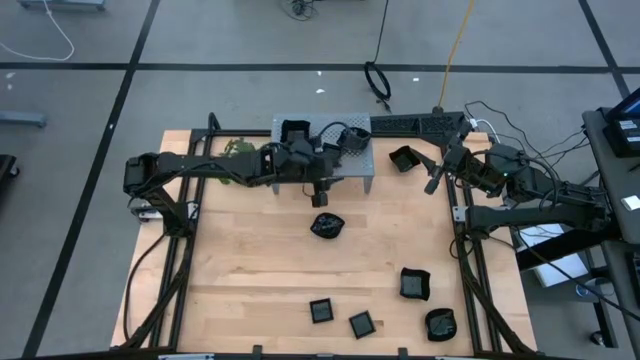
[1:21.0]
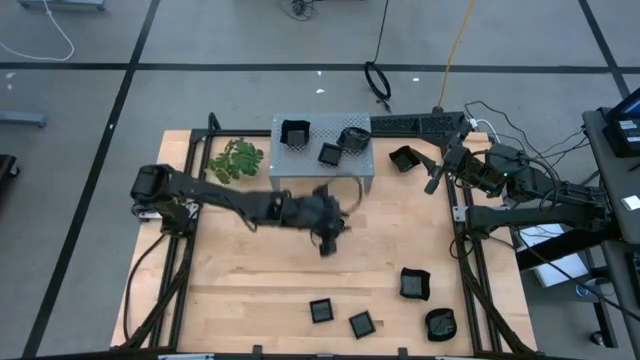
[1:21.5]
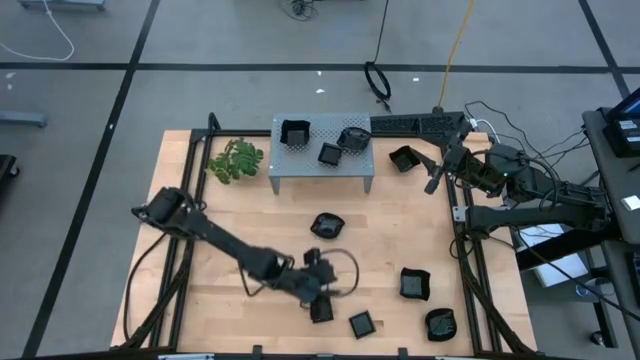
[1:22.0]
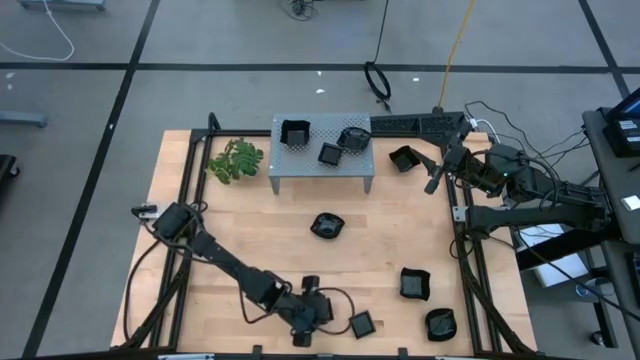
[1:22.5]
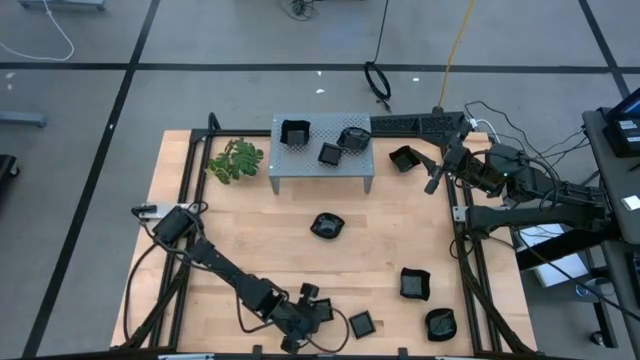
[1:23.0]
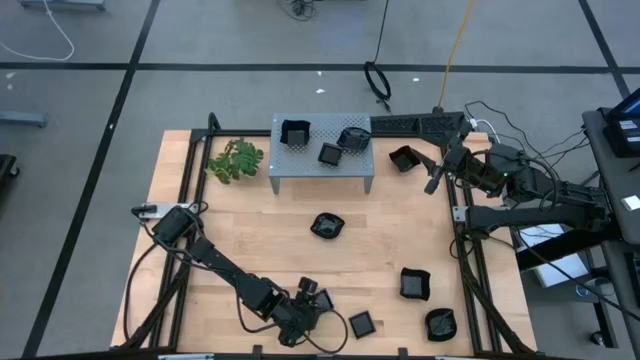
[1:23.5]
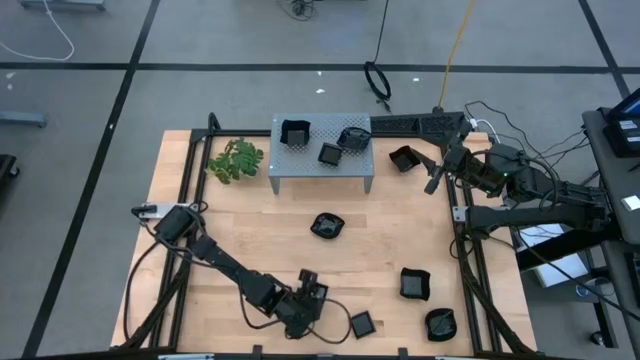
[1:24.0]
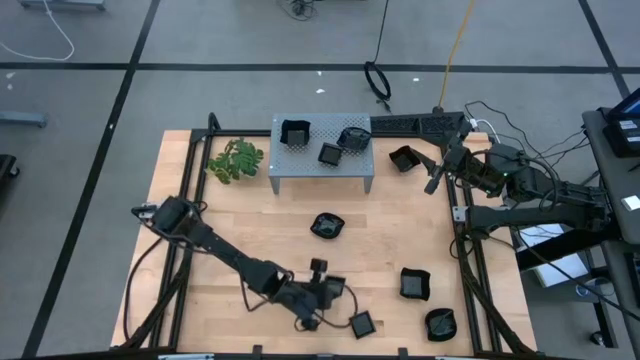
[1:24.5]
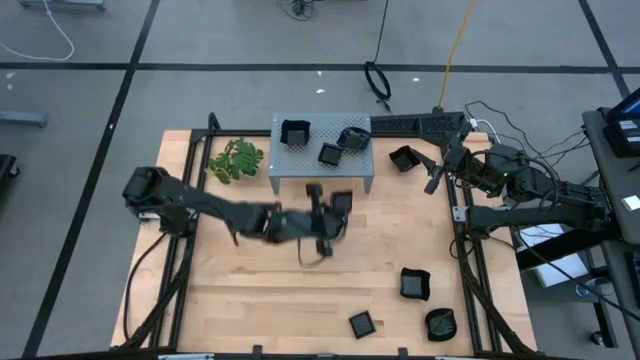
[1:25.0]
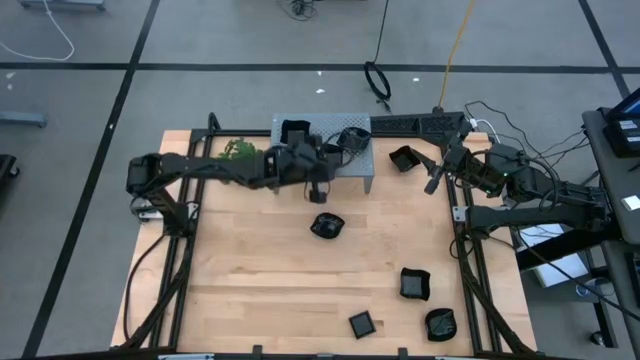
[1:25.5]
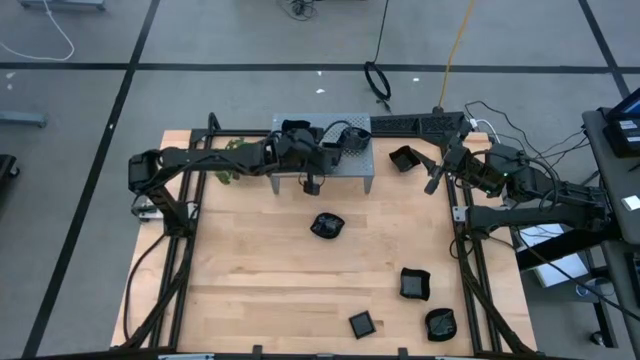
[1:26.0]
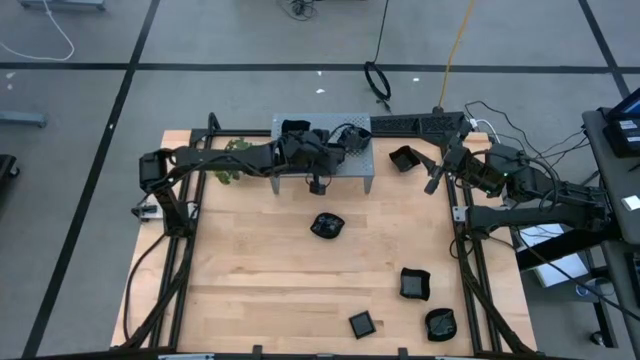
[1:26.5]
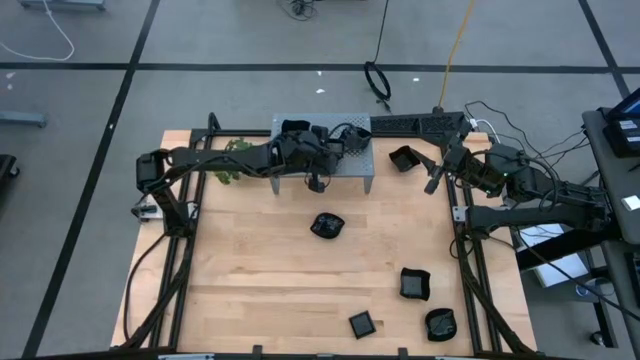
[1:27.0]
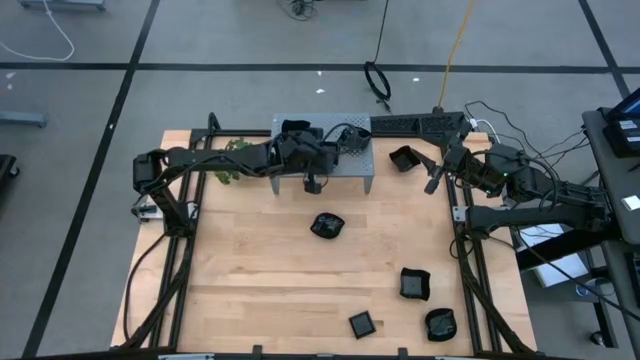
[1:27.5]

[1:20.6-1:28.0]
Task: Pick & Place Mini shaped plates
Stack the black square plate on top of the black square plate on the shelf

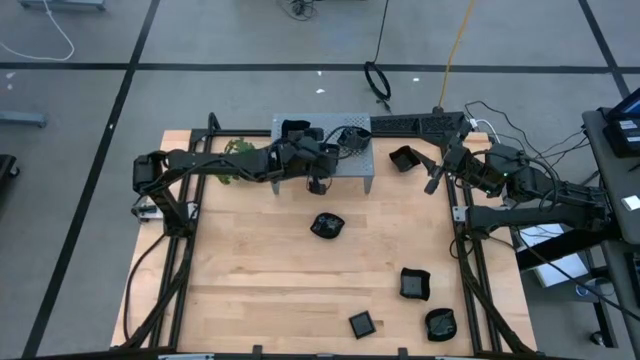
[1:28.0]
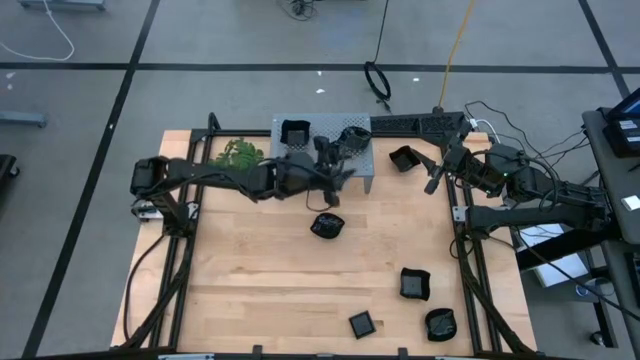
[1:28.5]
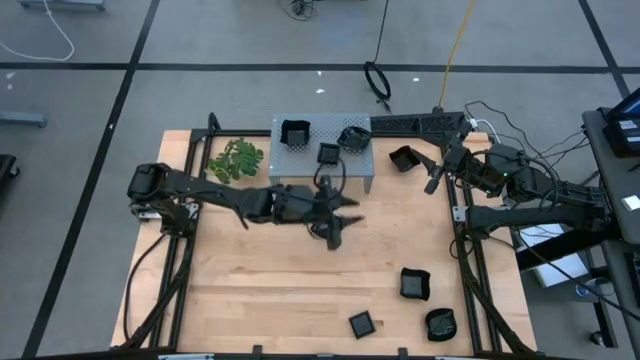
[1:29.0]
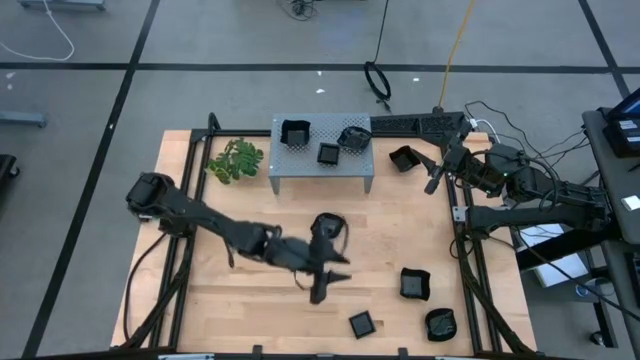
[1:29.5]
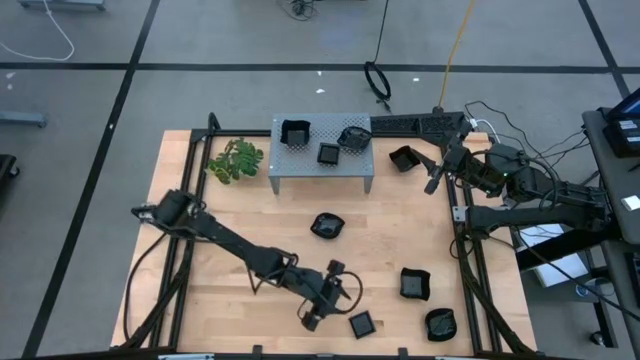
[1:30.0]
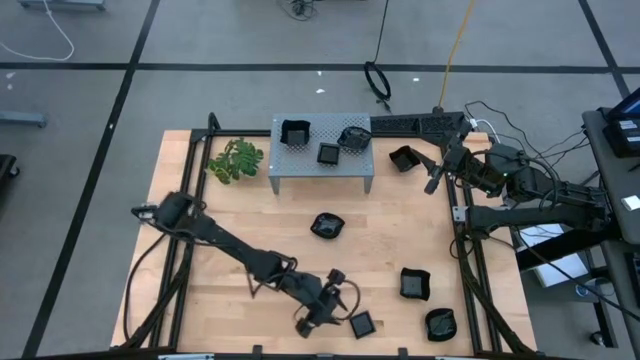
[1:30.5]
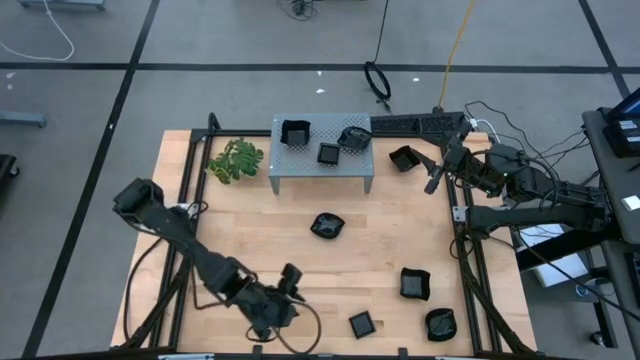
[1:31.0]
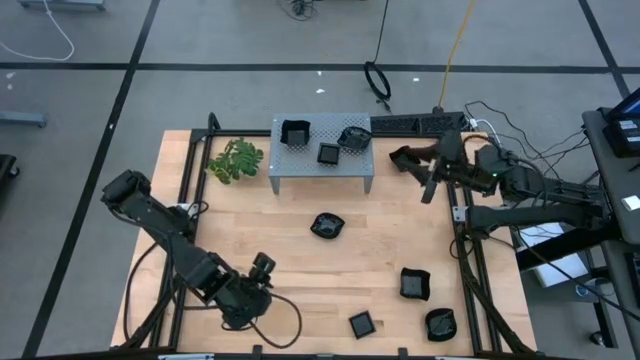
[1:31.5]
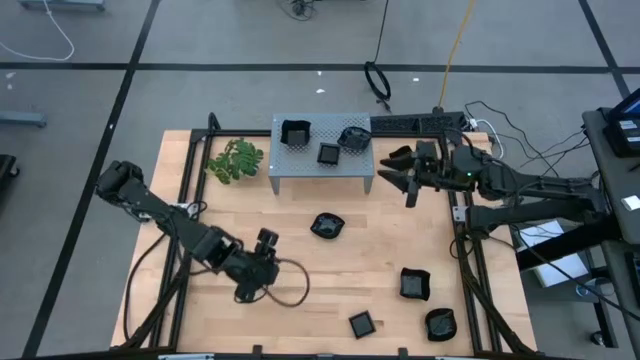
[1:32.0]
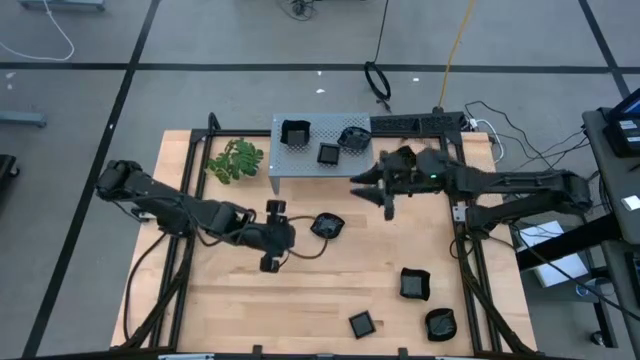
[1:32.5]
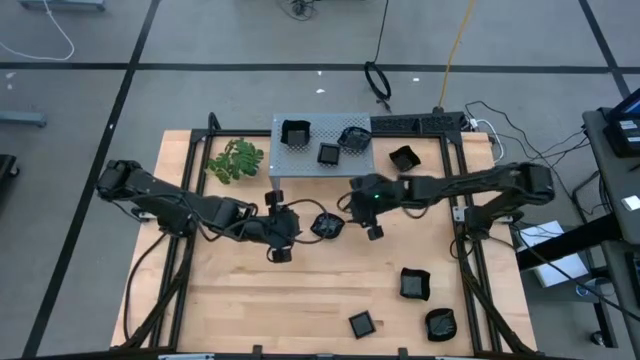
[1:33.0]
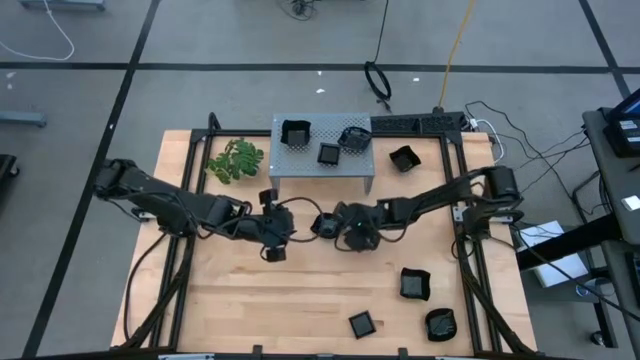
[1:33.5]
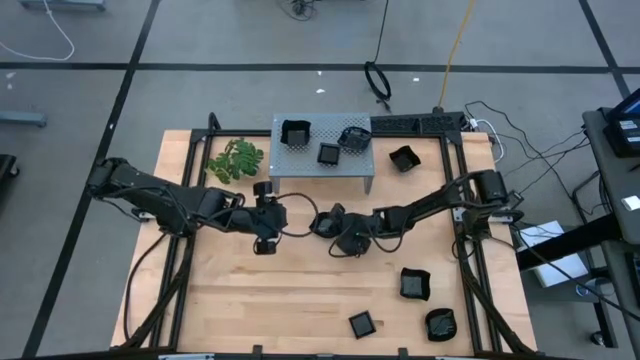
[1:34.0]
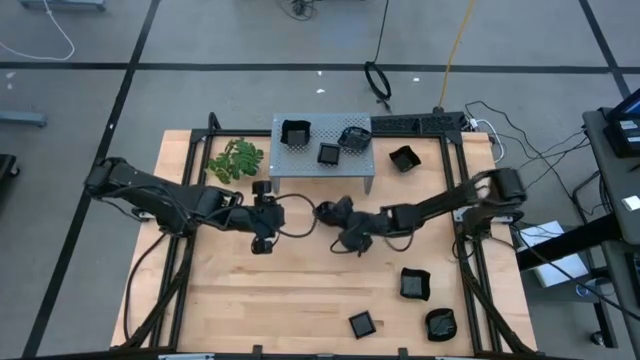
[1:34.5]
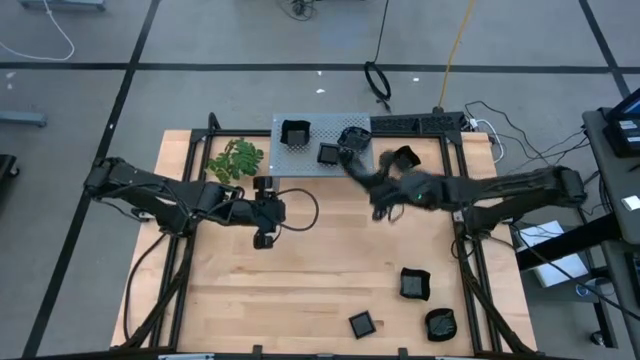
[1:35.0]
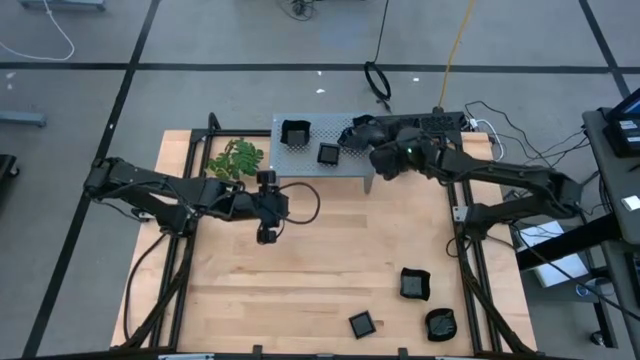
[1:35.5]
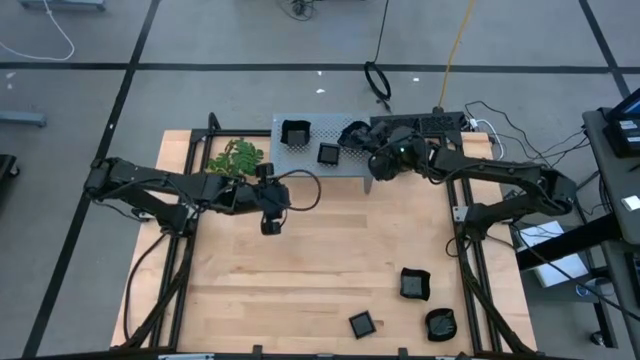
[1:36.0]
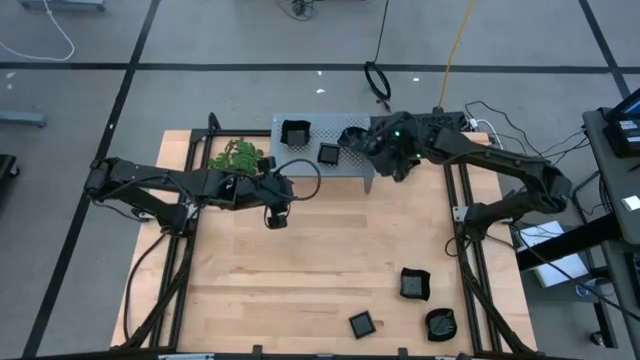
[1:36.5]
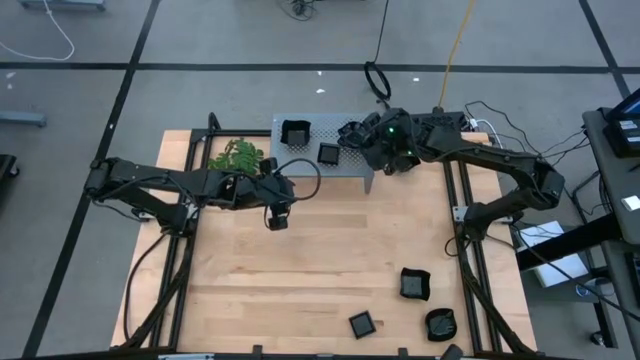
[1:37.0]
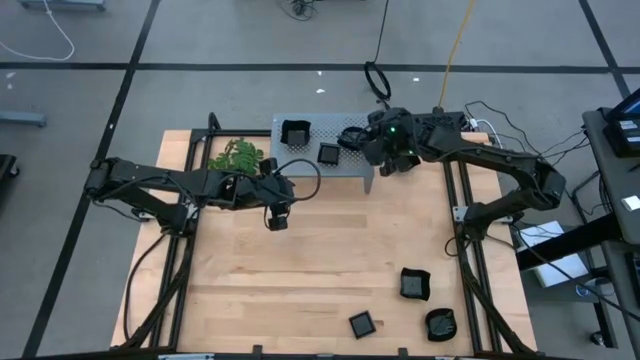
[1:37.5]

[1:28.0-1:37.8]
Stack the black leaf-shaped plate on top of the black leaf-shaped plate on the shelf

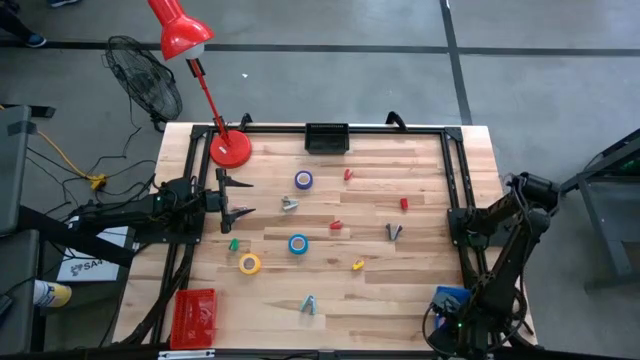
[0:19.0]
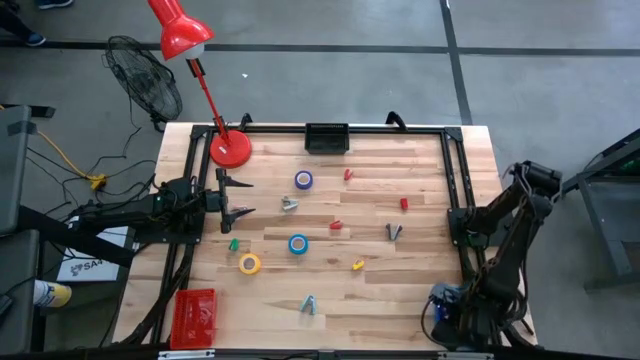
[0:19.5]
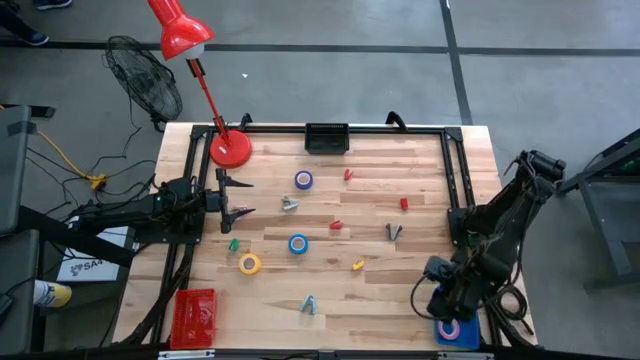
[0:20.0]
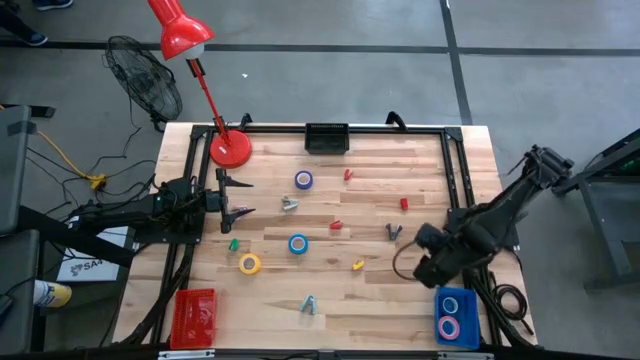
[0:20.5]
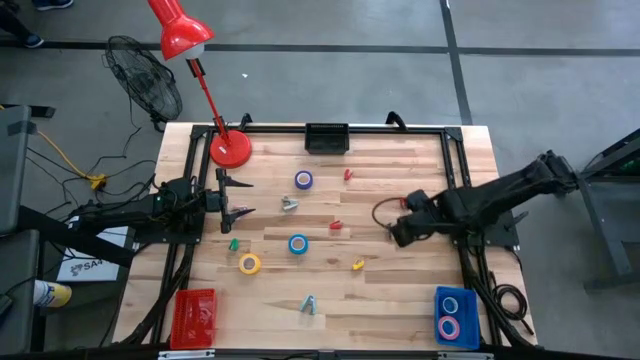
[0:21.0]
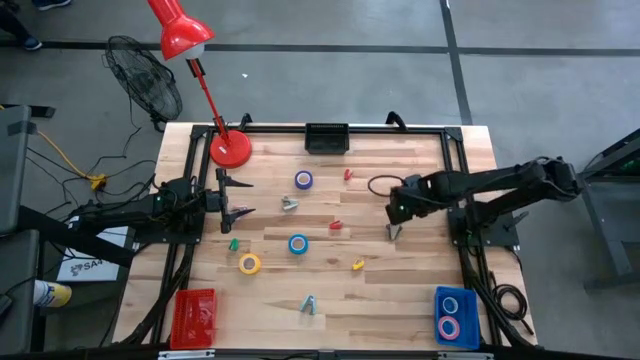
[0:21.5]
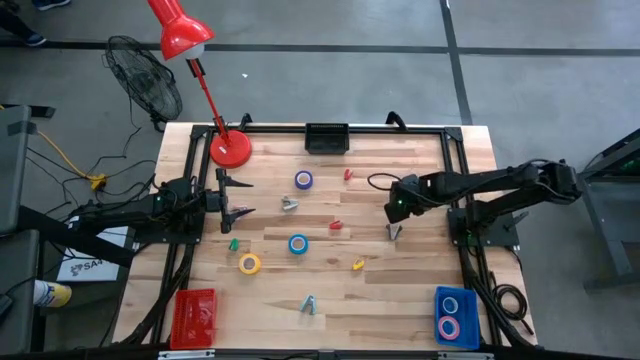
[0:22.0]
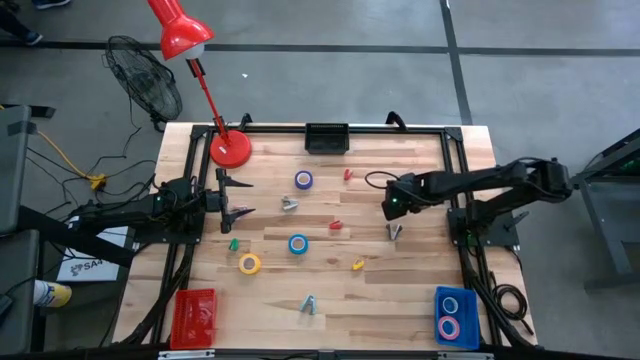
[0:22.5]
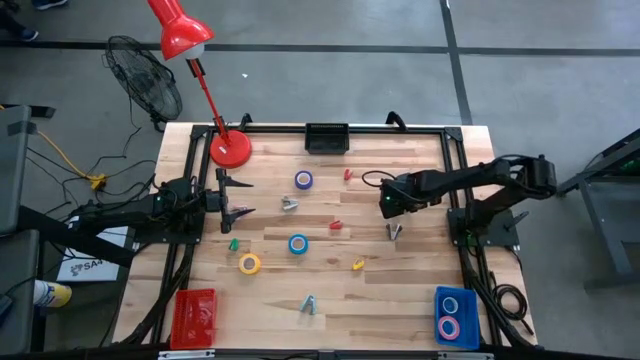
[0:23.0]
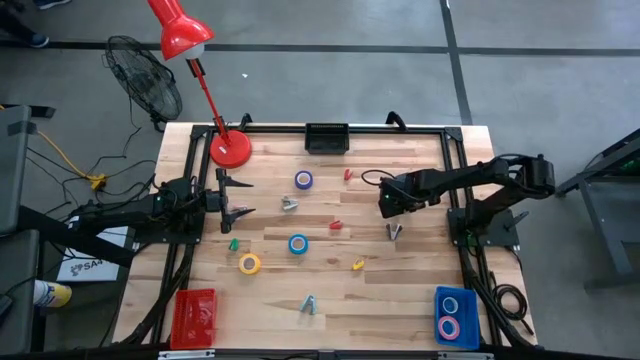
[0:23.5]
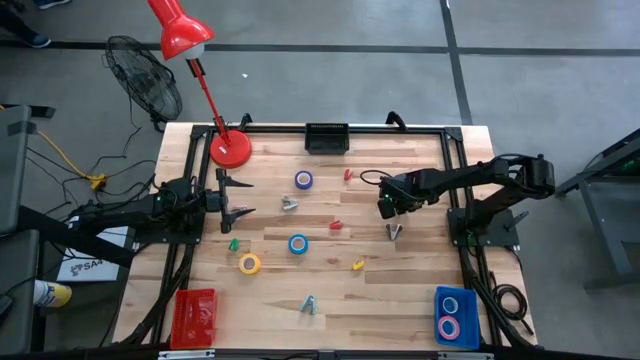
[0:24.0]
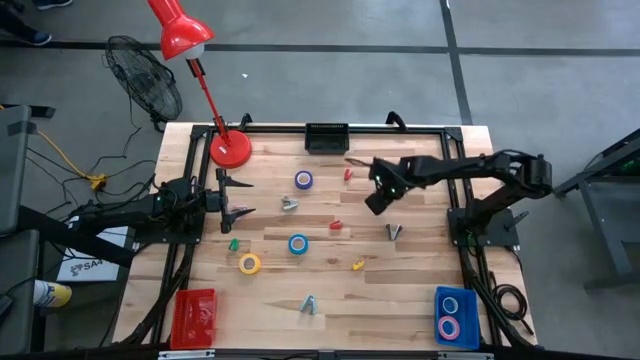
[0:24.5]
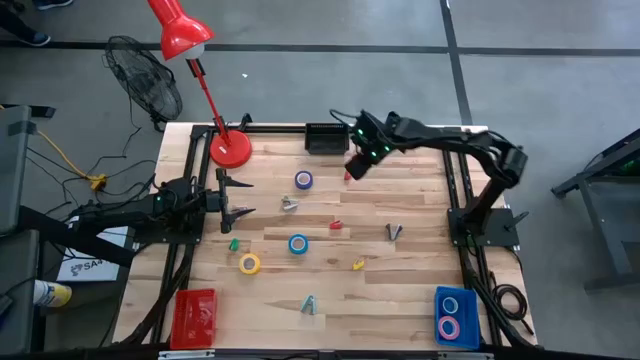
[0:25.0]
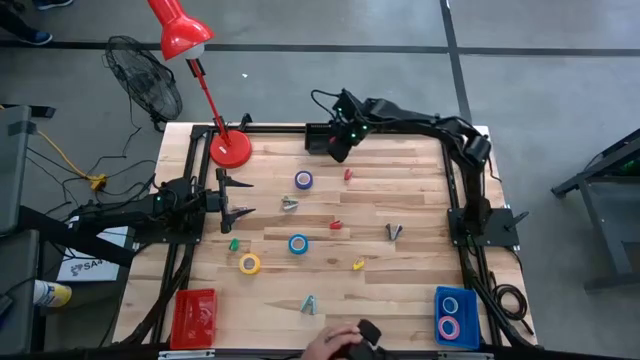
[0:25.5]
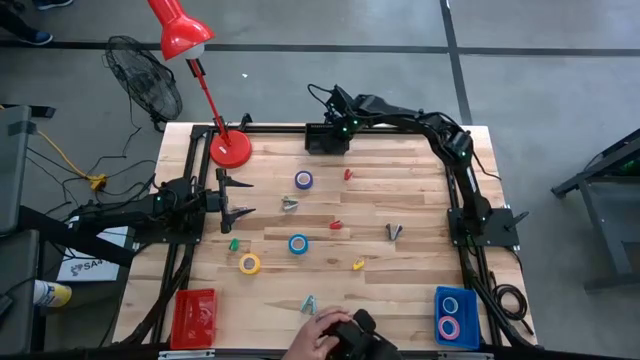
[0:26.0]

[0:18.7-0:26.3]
Task: Pick and place Stapler, Stapler remover, tape
Put the right red stapler into the black basket
